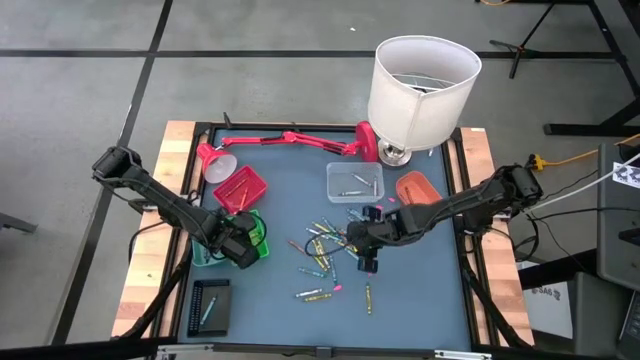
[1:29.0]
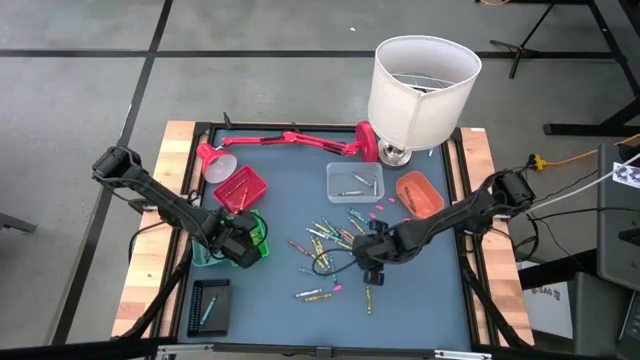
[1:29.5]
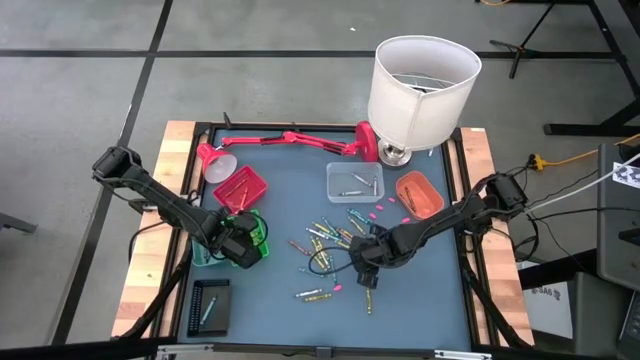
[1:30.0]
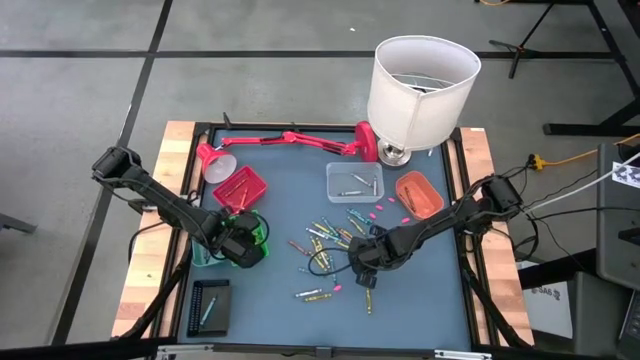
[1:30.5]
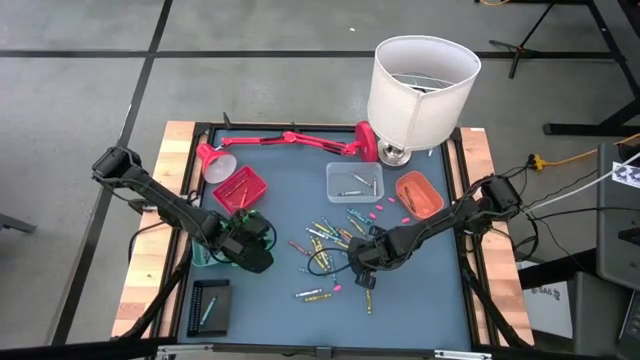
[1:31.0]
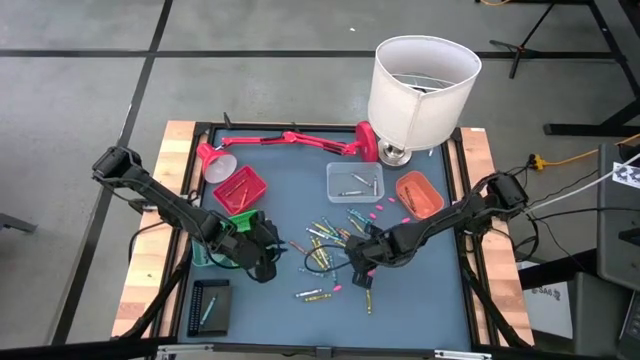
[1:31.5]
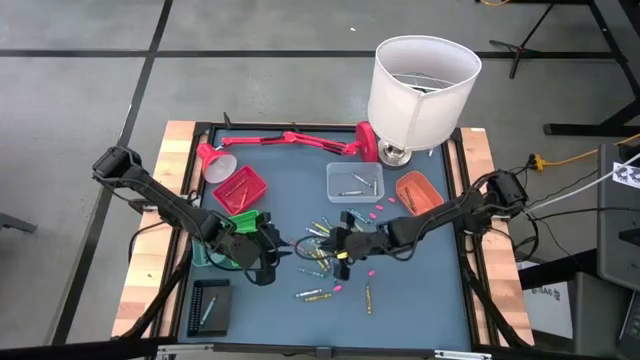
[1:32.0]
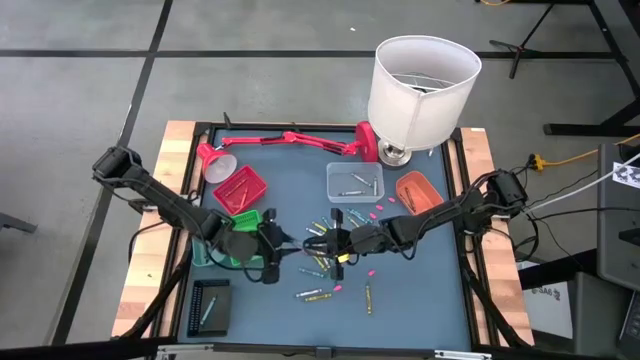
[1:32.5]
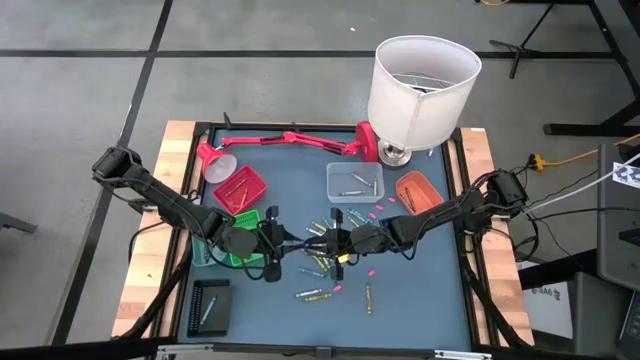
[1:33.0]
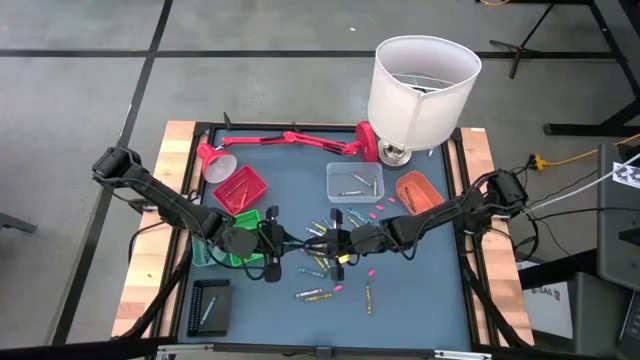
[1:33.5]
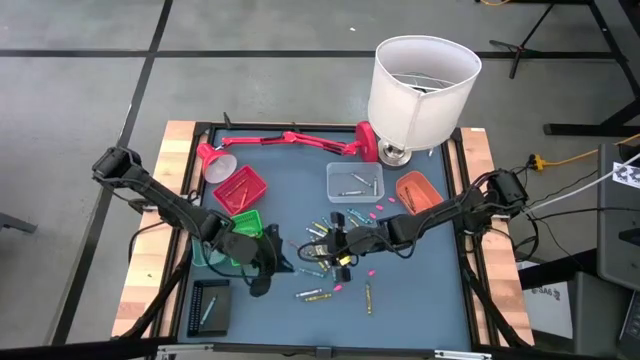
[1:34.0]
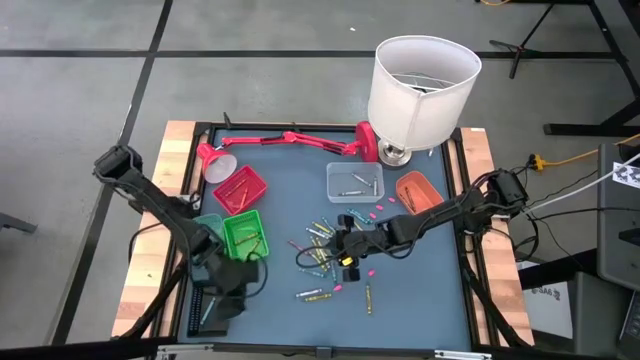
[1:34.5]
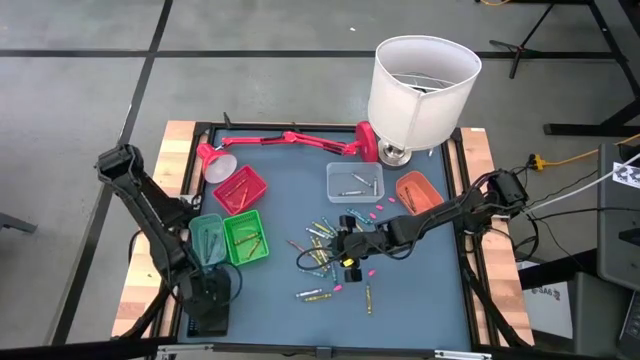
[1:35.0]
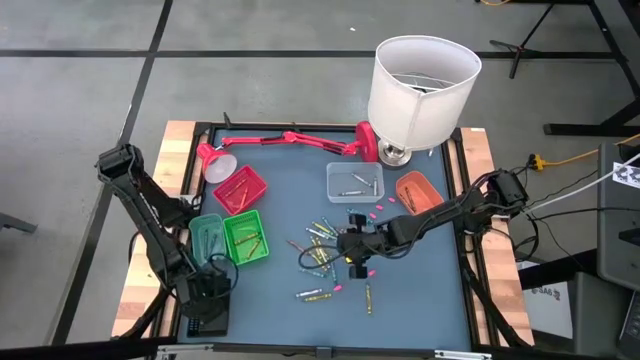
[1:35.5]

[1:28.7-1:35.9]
Task: Sort crayons
Put the dark green crayon into the black bin

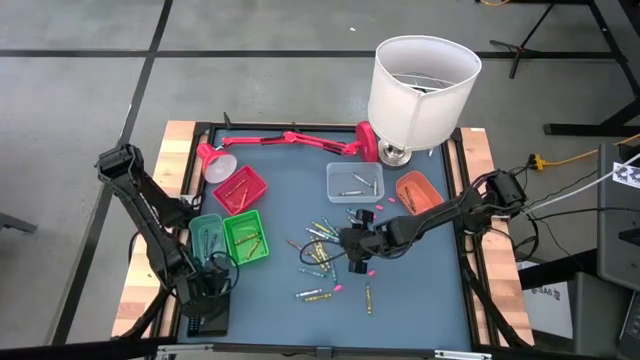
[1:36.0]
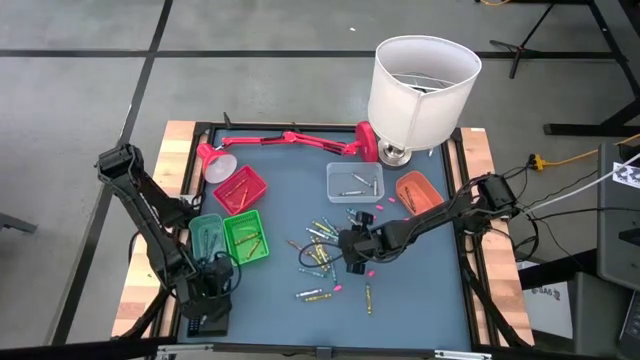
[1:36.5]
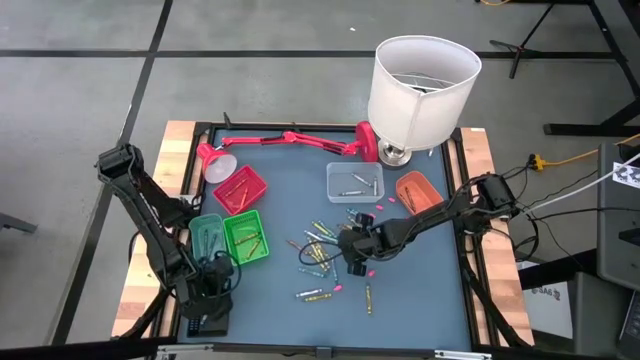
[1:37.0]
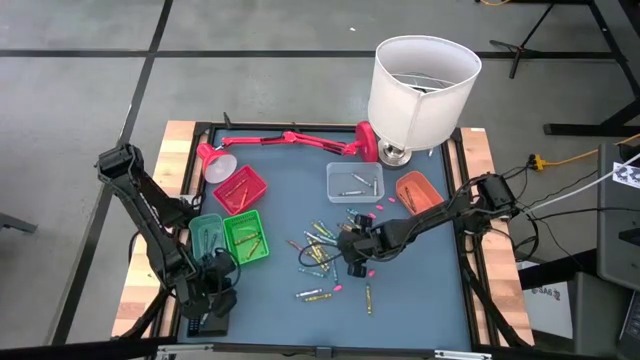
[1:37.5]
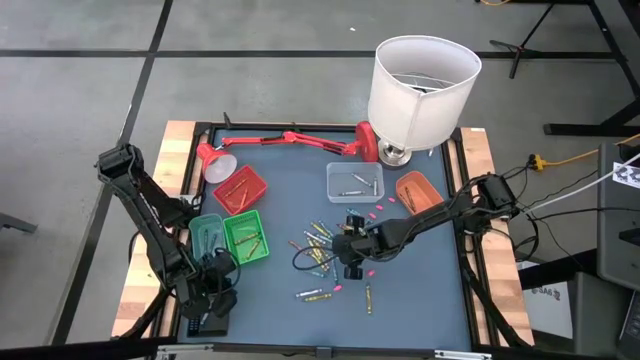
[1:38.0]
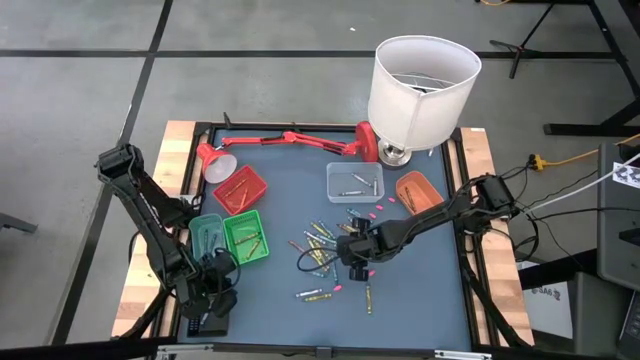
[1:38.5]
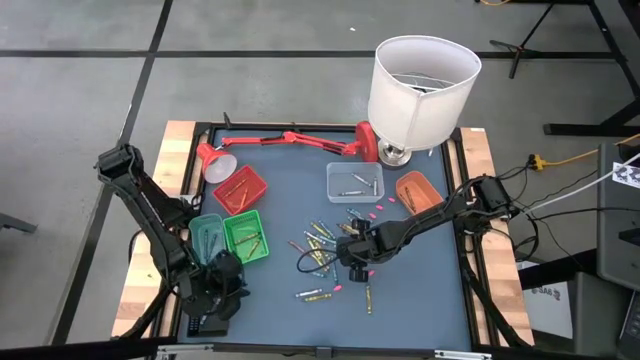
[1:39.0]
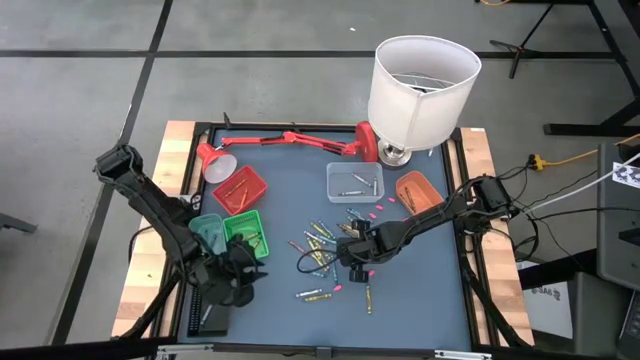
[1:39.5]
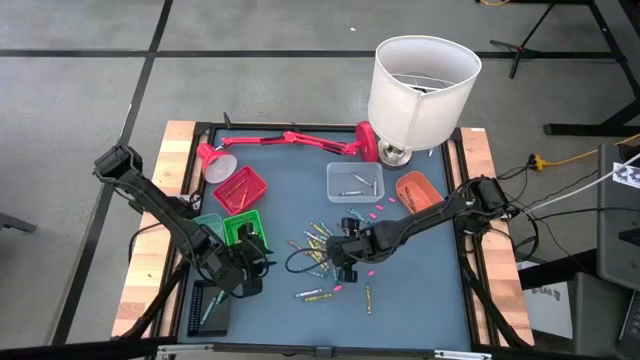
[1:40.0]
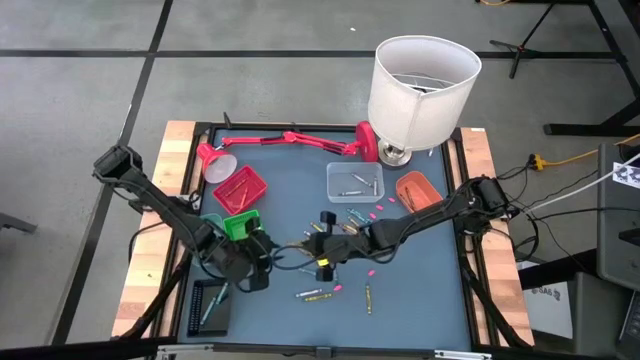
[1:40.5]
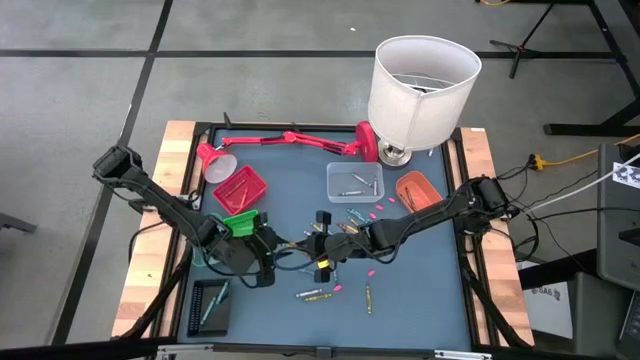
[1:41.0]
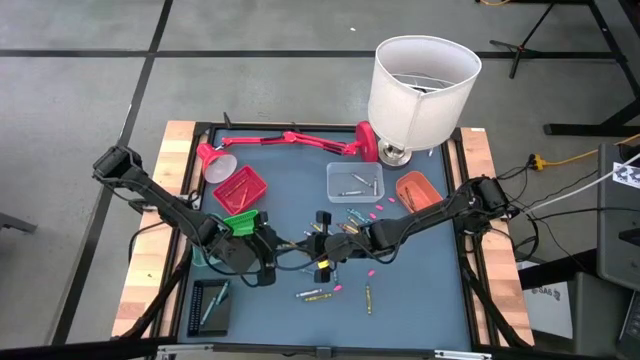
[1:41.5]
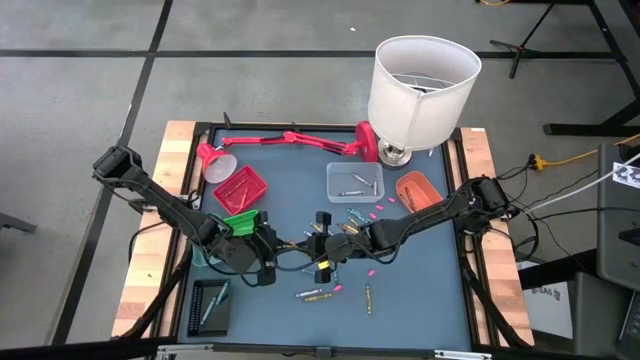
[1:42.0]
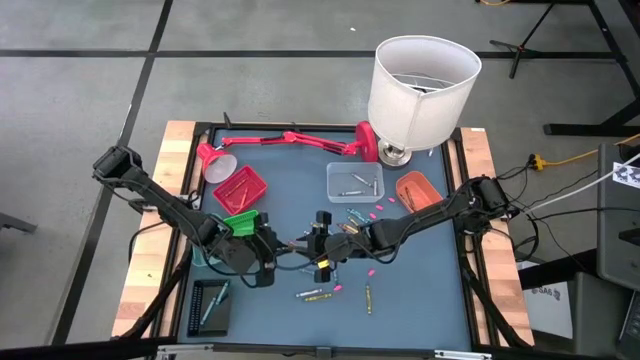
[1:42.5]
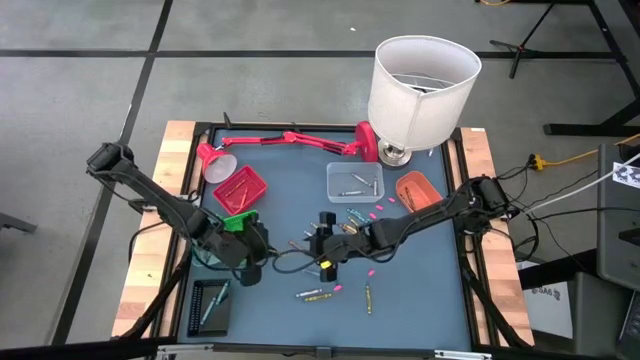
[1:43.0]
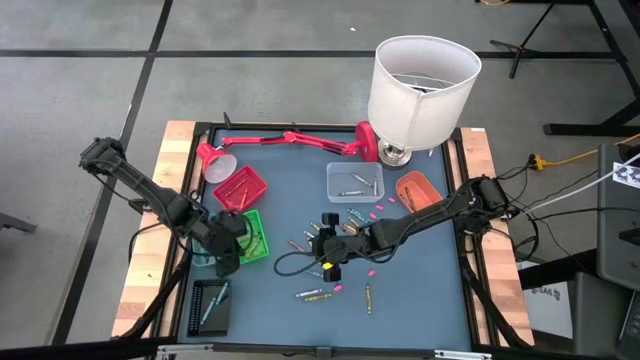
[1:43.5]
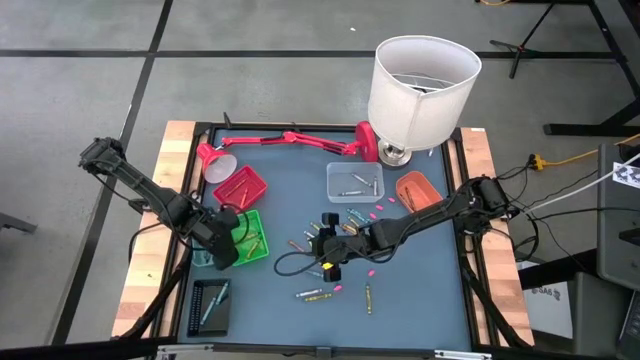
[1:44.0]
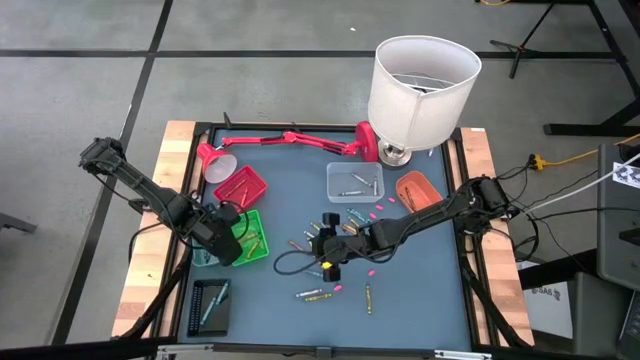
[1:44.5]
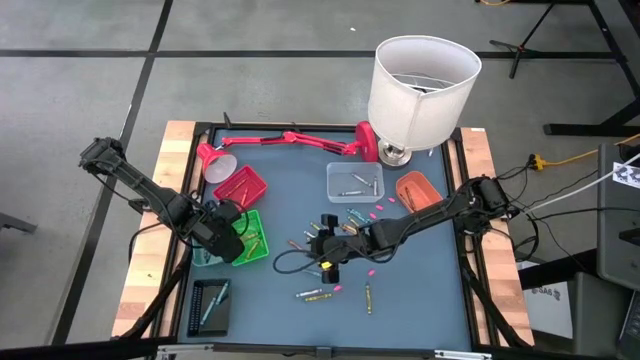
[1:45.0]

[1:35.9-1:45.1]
Put the green crayon into the green bin

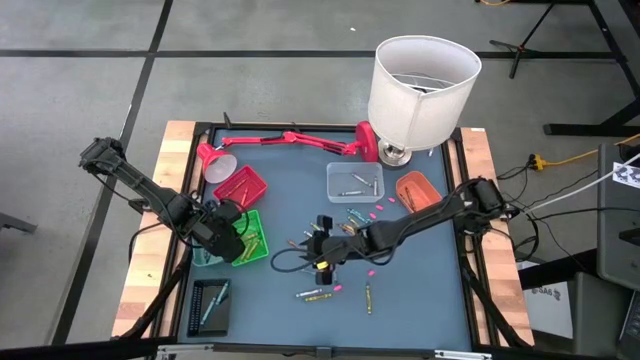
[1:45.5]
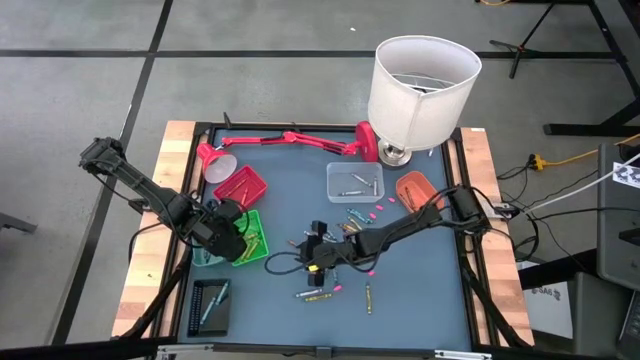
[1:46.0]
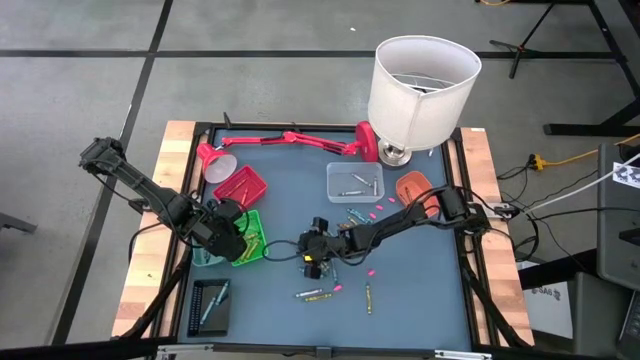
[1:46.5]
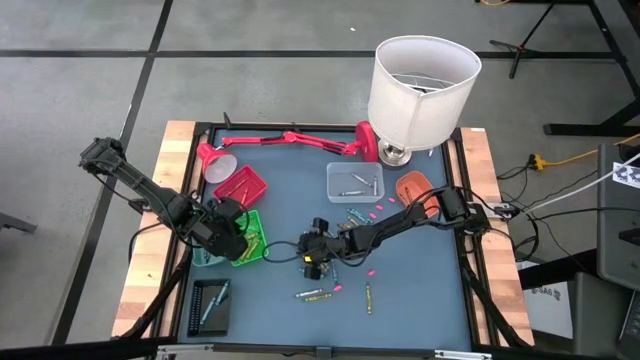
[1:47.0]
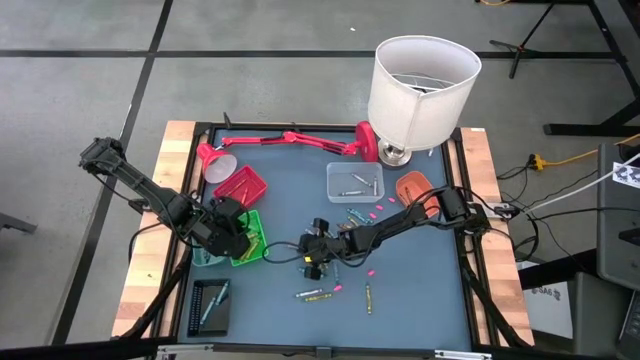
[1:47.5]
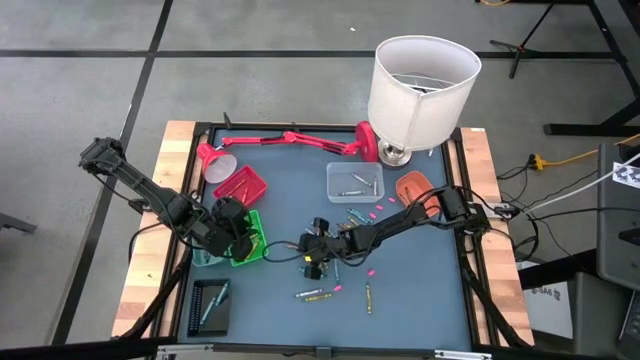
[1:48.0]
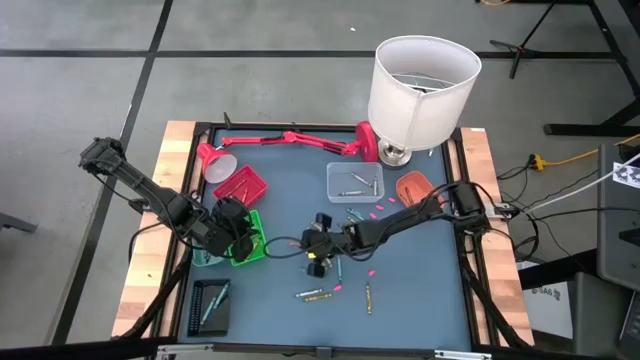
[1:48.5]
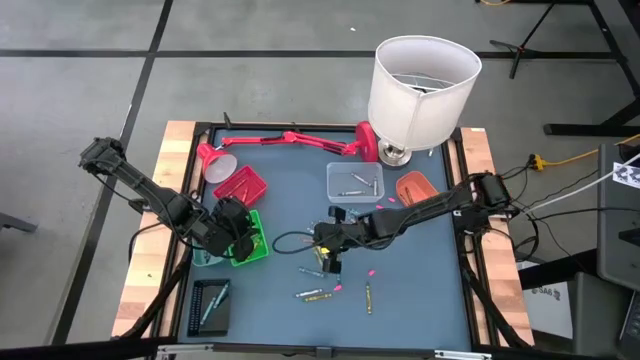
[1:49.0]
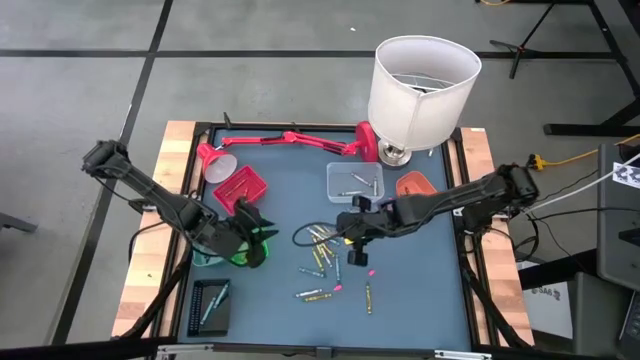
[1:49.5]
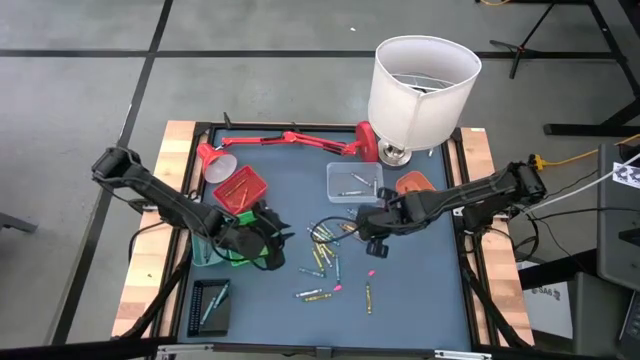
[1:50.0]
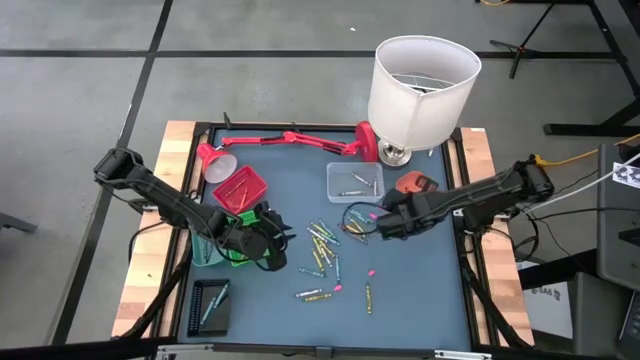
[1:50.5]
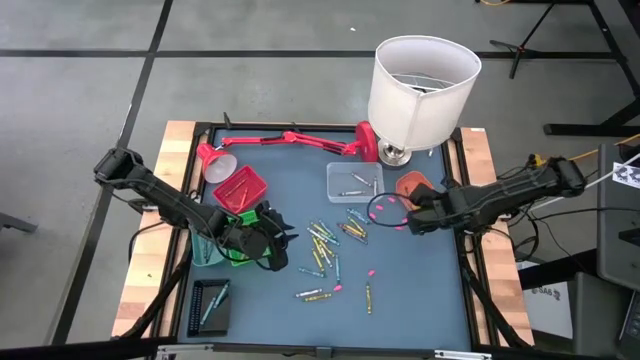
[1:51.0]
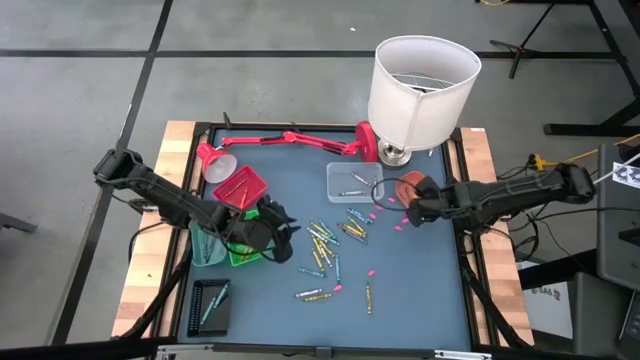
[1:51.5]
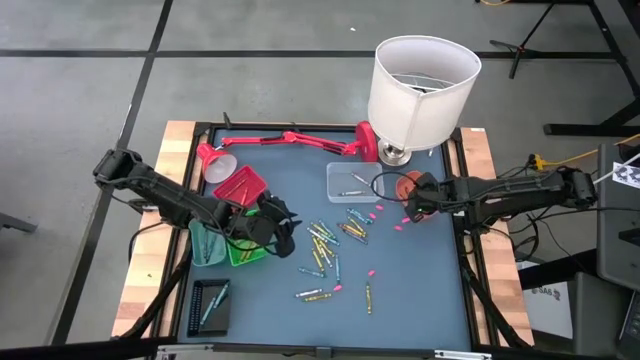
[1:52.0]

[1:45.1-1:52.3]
Put the brown crayon into the orange bin
